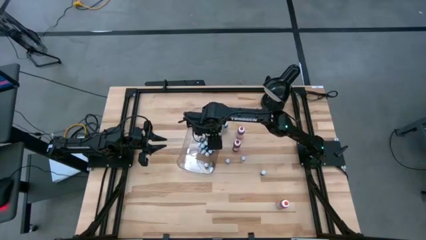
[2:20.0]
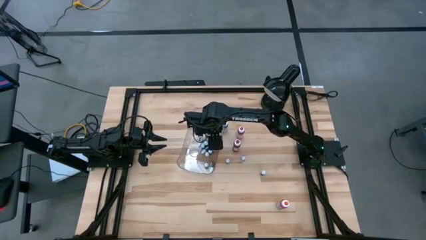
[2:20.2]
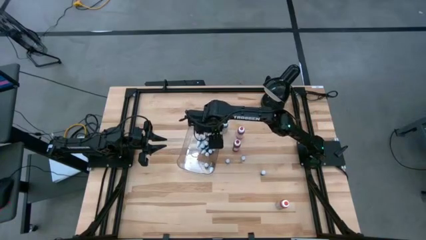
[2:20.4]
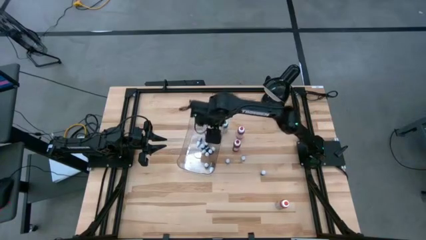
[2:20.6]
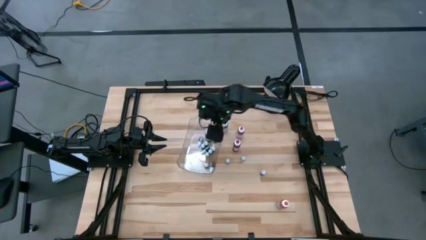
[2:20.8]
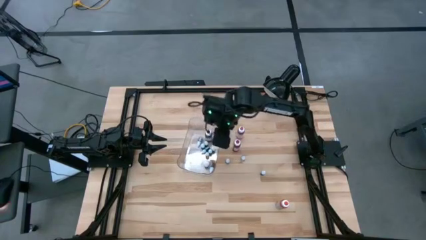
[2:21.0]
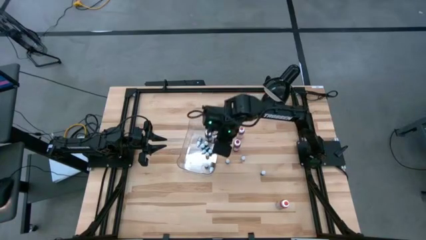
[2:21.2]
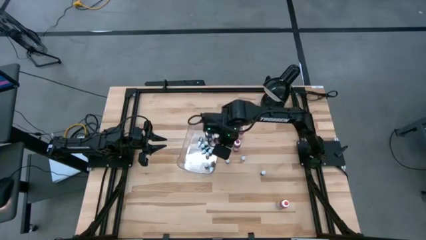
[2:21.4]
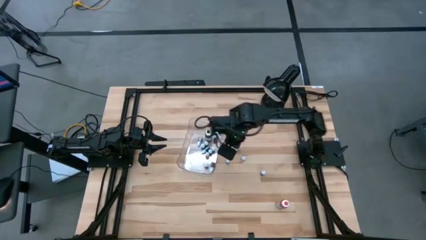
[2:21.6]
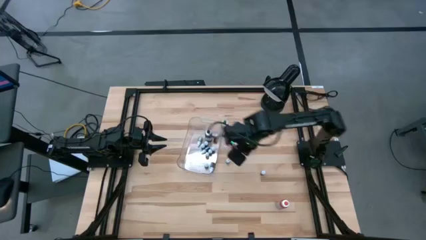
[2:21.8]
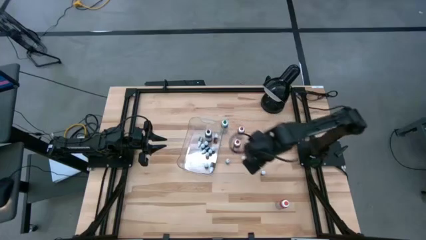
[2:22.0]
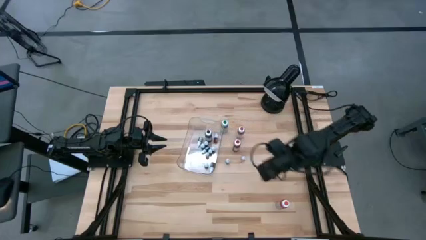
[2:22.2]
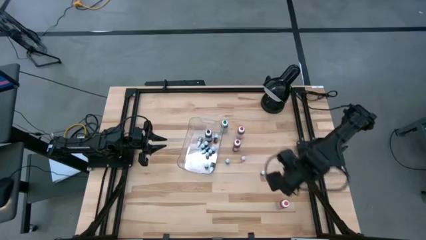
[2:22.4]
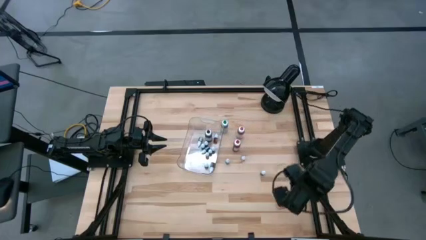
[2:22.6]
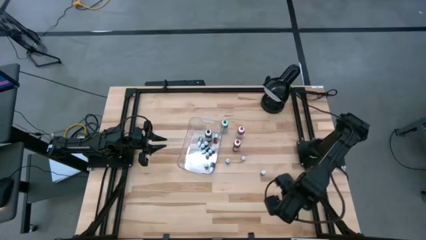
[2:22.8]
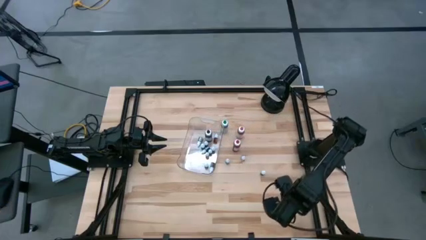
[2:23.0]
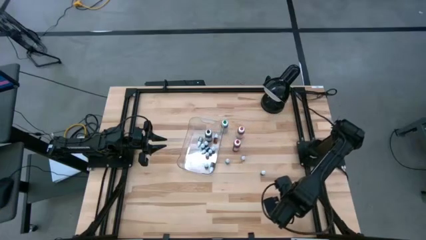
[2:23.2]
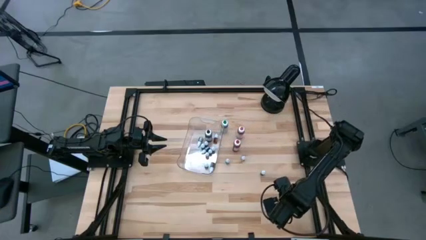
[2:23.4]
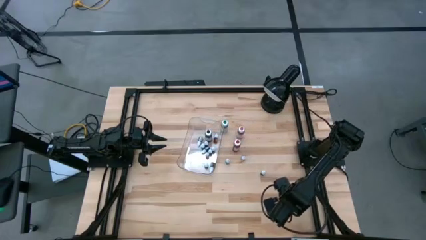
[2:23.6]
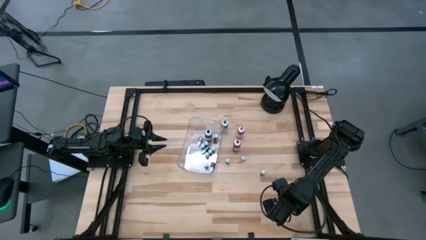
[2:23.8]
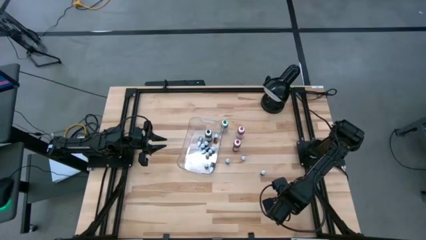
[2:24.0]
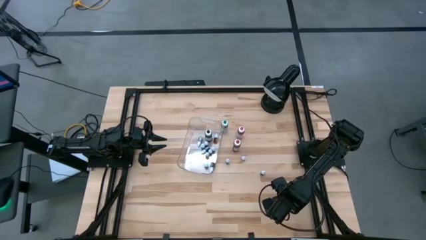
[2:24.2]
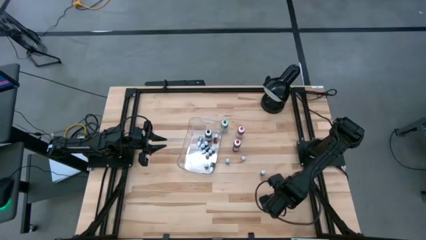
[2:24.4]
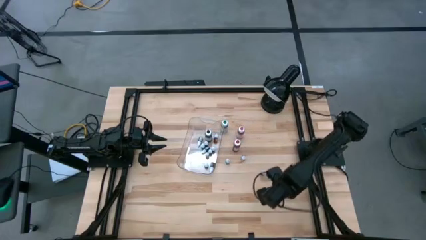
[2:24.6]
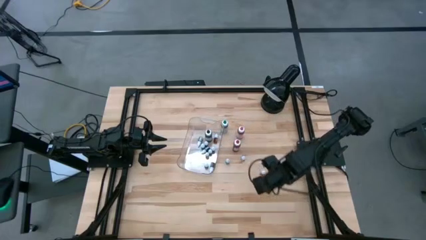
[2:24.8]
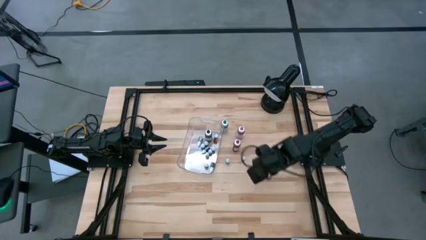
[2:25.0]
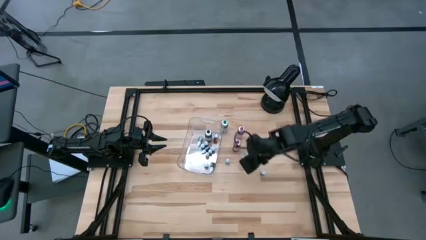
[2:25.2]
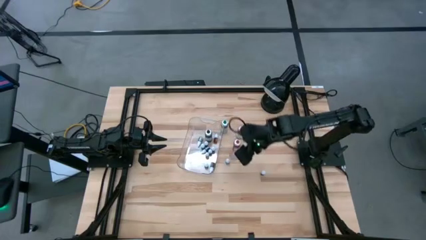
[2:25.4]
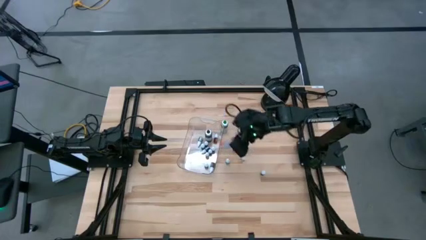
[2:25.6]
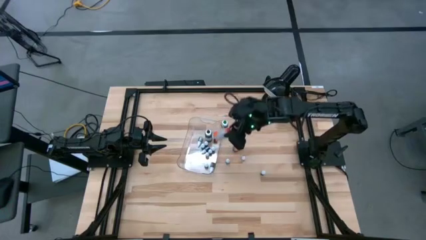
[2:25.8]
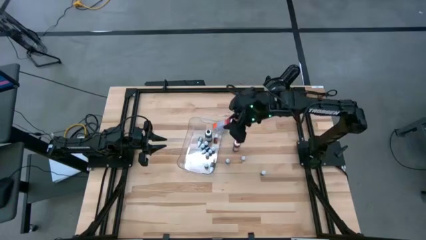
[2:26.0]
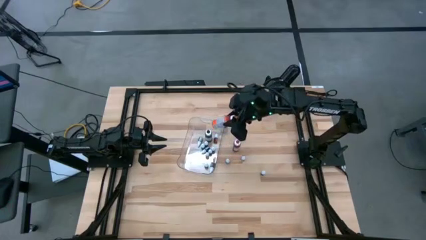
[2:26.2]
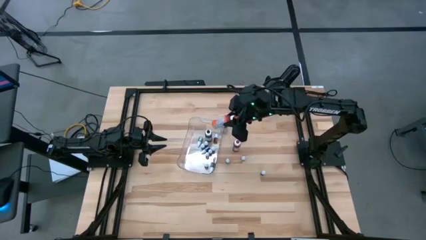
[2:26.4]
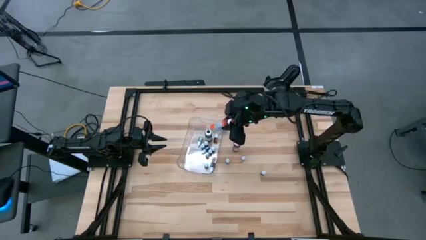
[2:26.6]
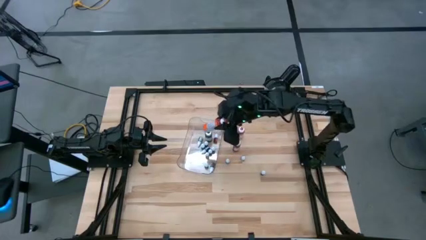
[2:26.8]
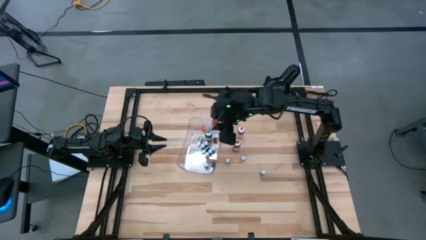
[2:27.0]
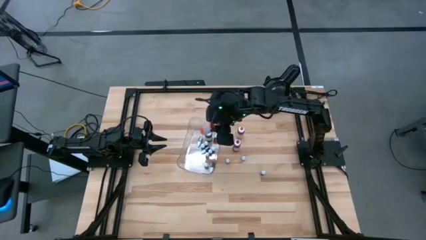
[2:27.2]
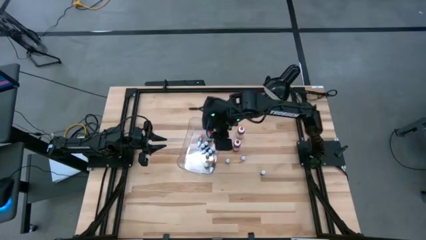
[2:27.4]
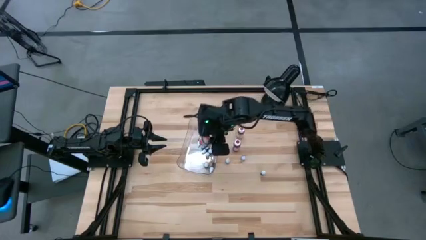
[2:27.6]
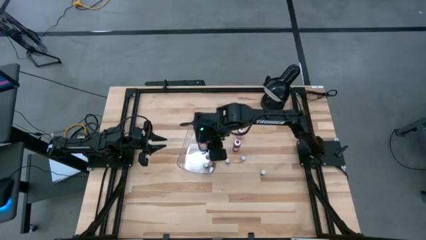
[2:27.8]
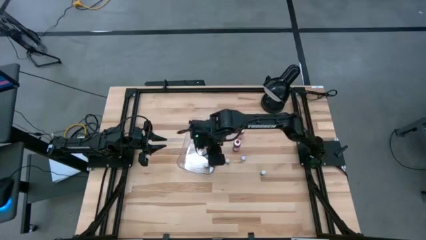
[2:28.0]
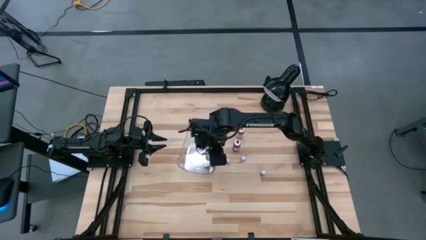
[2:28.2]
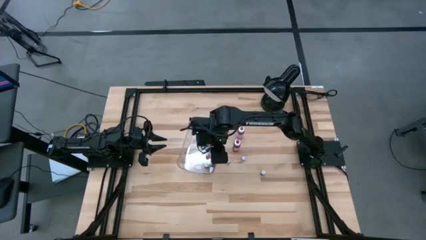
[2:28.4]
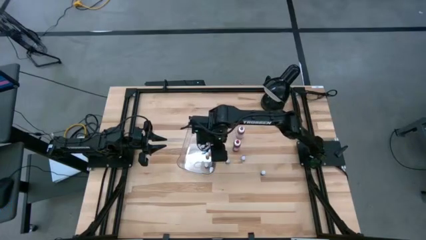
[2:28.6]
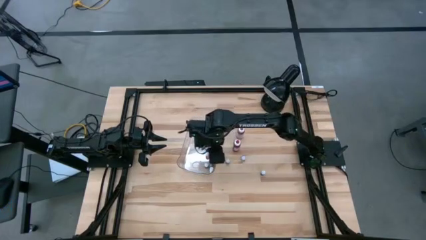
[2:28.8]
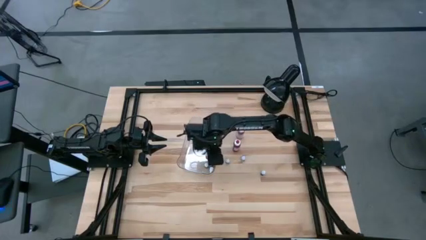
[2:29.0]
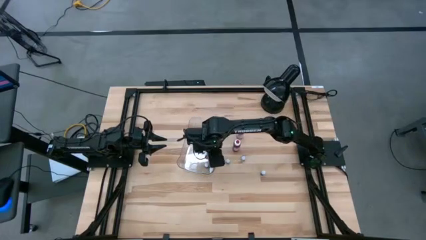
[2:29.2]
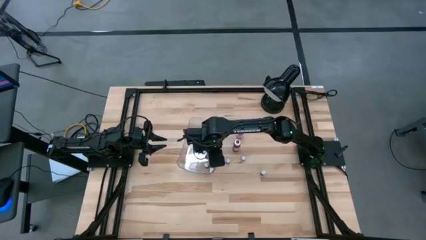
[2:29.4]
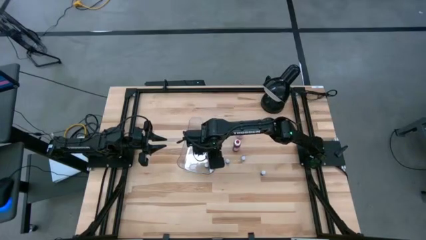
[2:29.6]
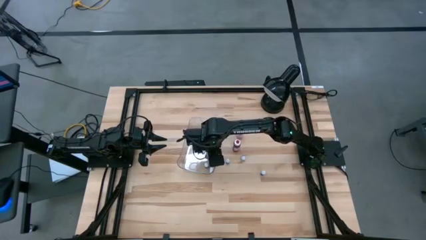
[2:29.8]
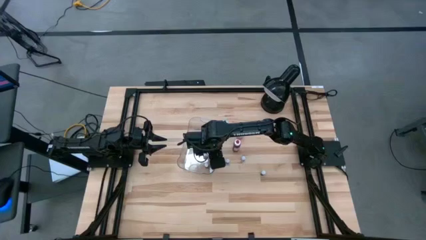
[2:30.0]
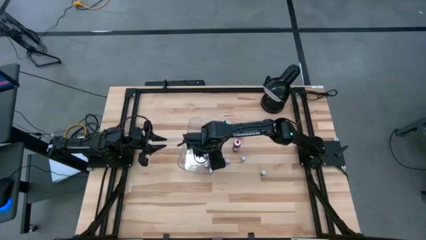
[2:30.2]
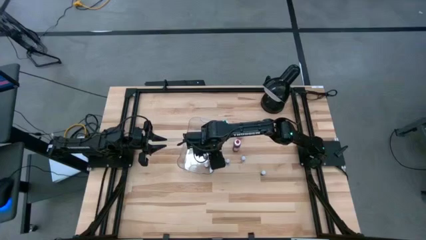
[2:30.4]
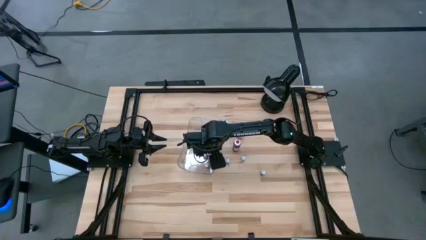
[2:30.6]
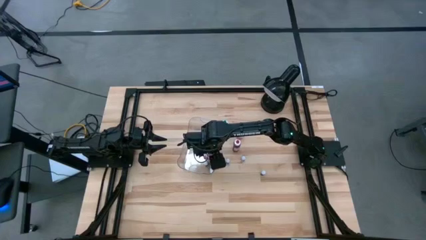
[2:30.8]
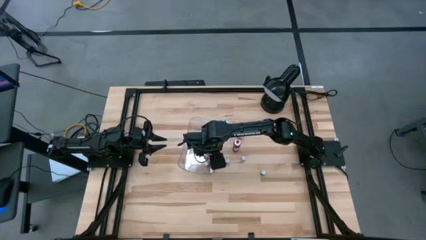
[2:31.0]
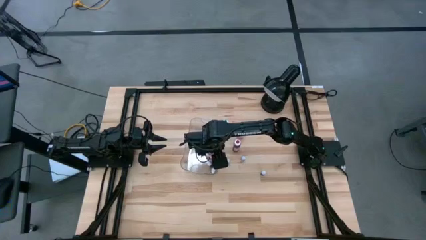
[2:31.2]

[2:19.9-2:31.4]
Task: Pick & Place food coloring
Put the large orange food coloring bottle into the transparent bin

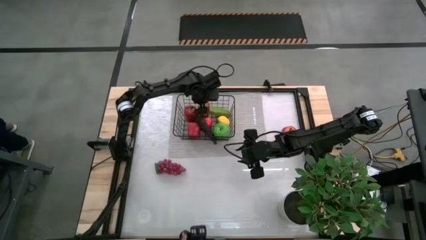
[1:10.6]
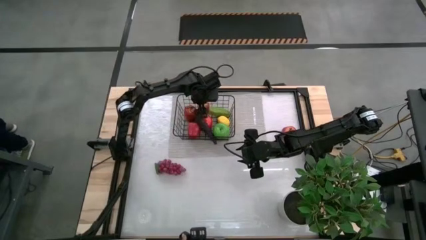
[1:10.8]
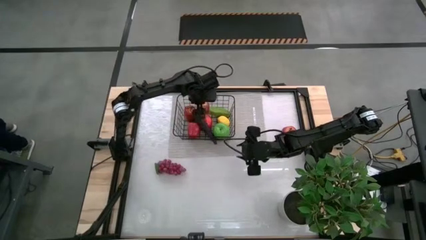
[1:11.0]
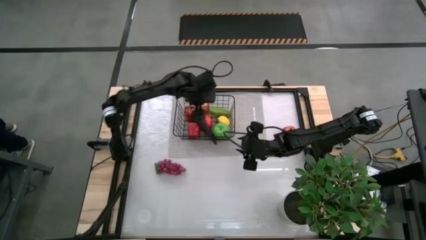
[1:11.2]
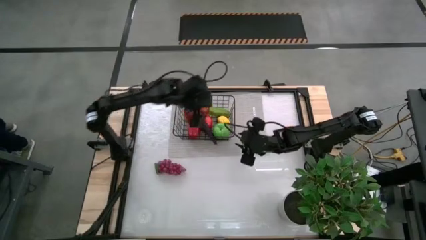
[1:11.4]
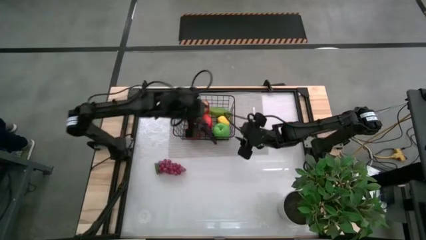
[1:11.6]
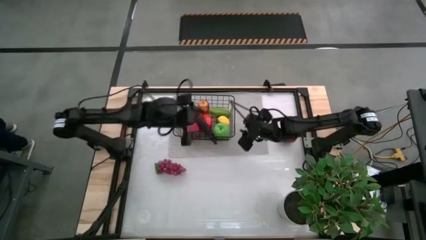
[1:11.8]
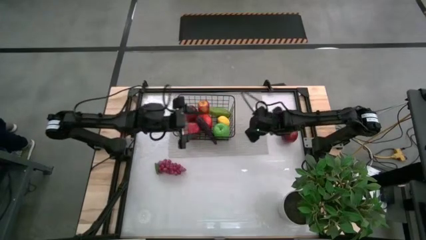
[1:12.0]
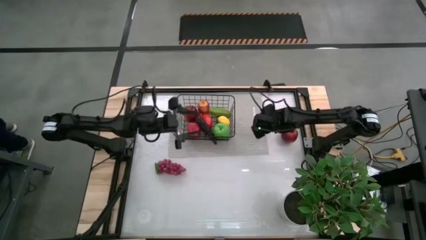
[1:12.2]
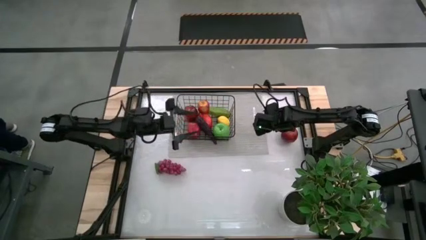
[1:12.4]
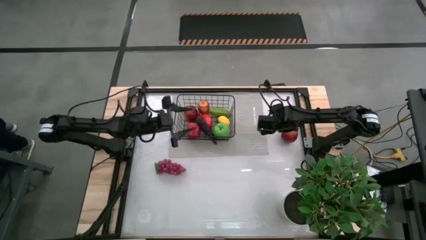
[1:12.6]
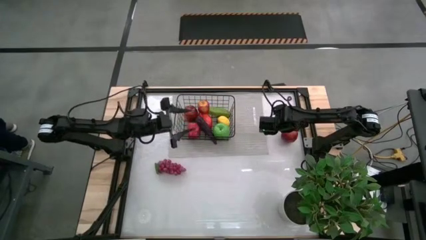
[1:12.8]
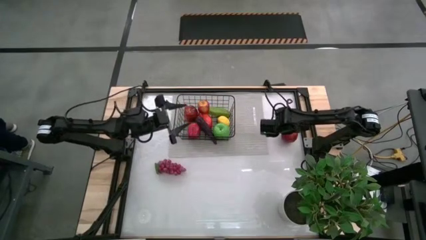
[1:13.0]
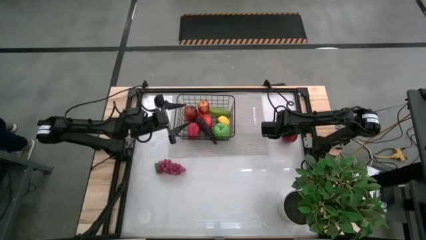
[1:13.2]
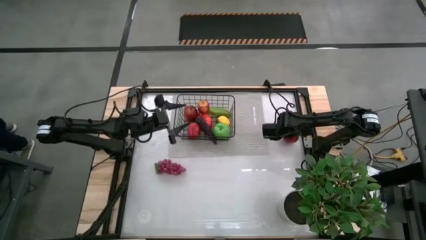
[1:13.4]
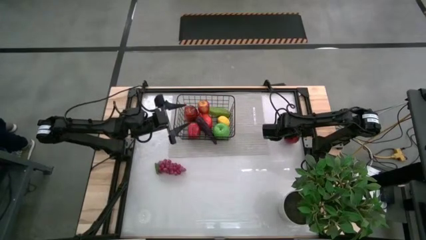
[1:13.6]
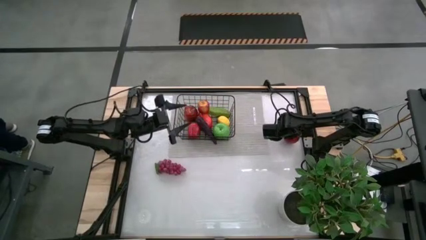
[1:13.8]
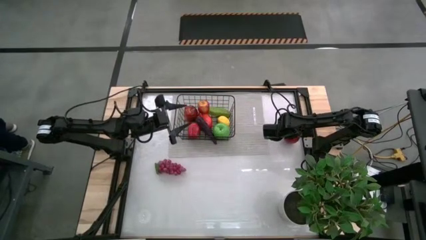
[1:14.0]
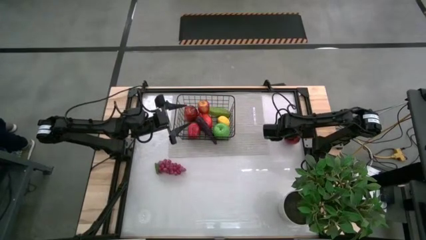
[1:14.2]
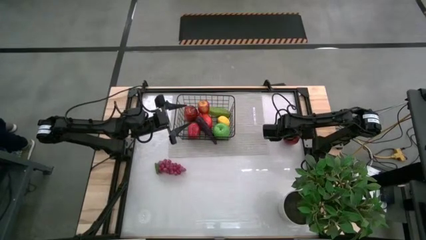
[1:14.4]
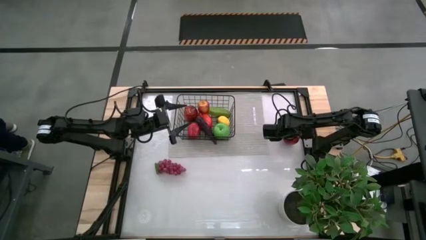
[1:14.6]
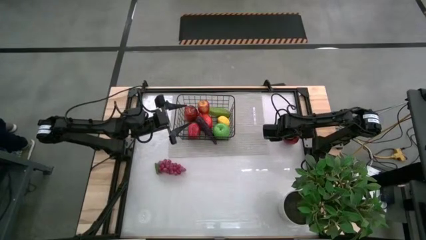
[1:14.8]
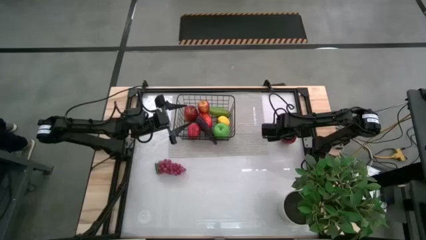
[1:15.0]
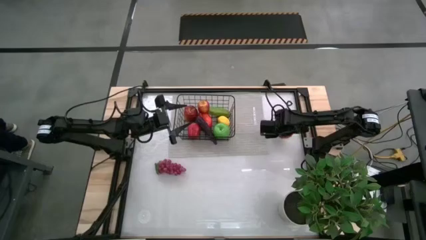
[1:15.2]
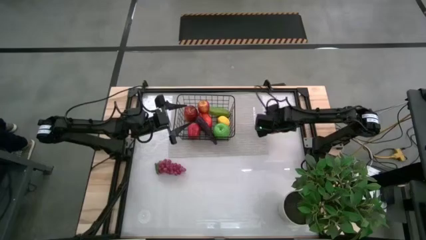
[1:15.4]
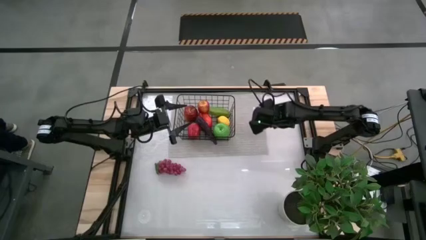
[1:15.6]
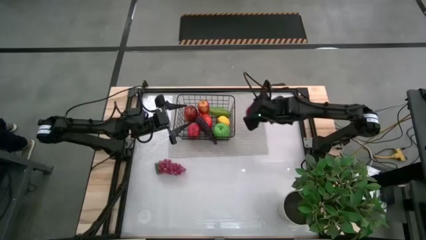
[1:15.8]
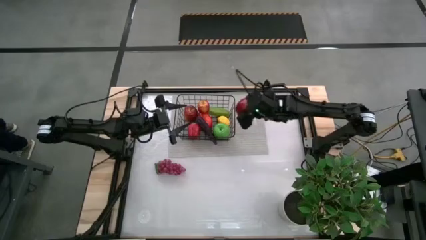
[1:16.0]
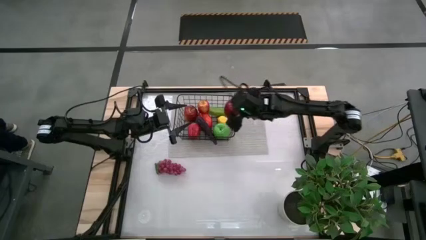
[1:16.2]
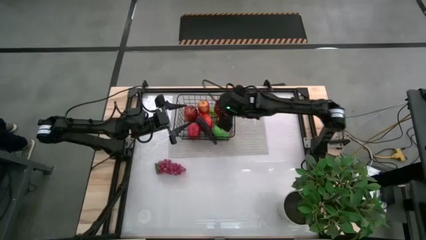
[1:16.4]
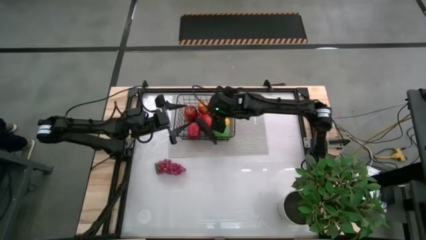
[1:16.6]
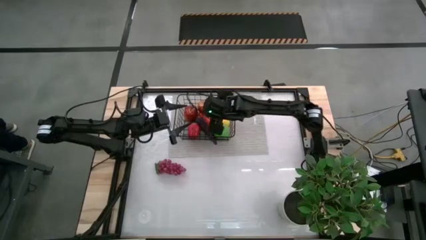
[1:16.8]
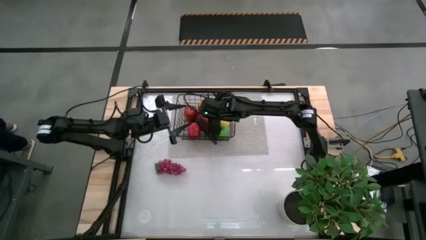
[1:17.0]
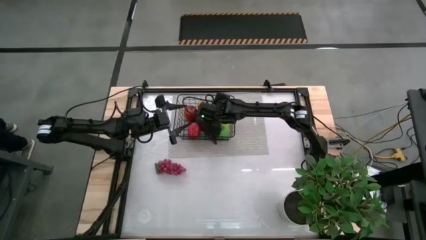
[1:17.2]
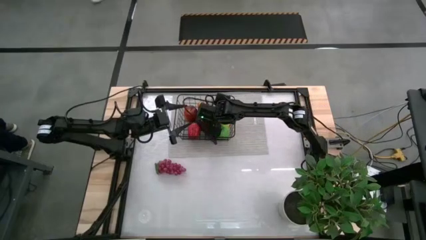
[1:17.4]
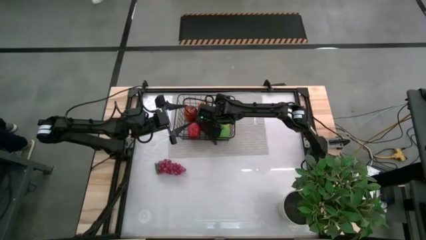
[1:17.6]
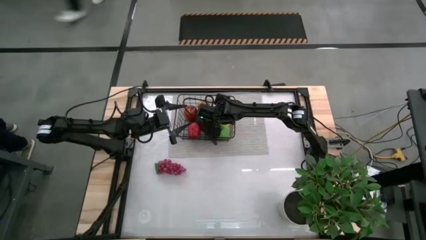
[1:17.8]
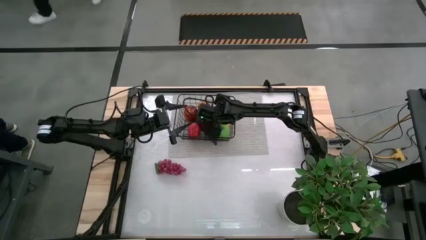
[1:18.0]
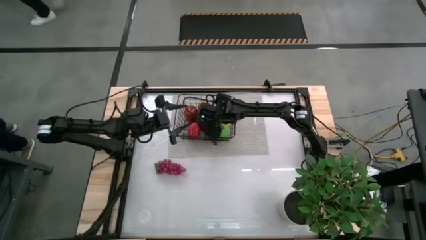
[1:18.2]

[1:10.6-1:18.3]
Task: Build produce basket
Put the pomegranate into the wire basket
